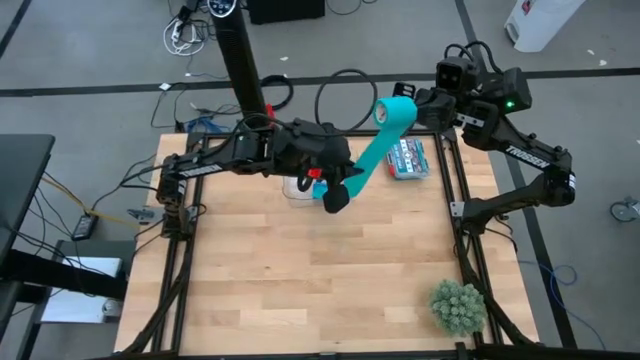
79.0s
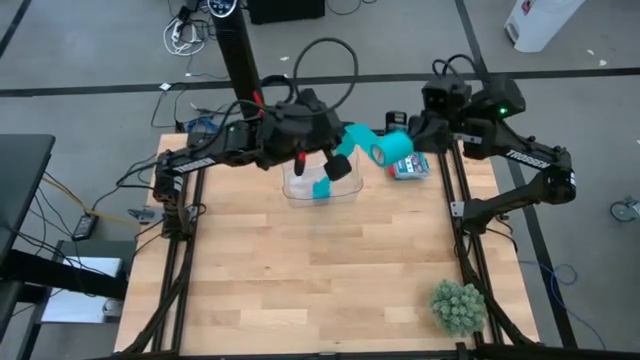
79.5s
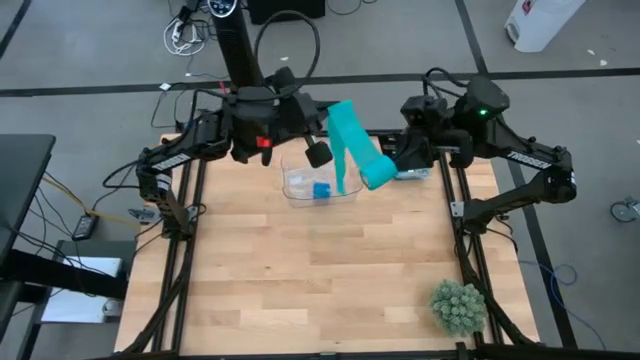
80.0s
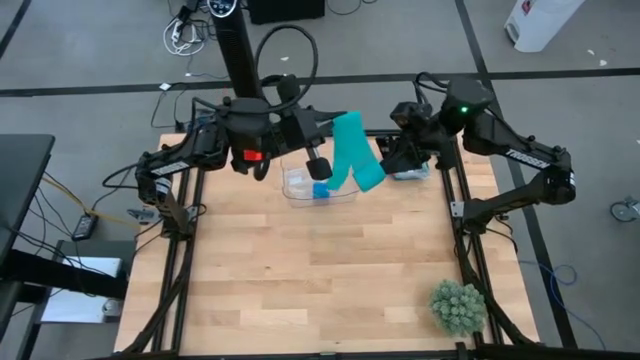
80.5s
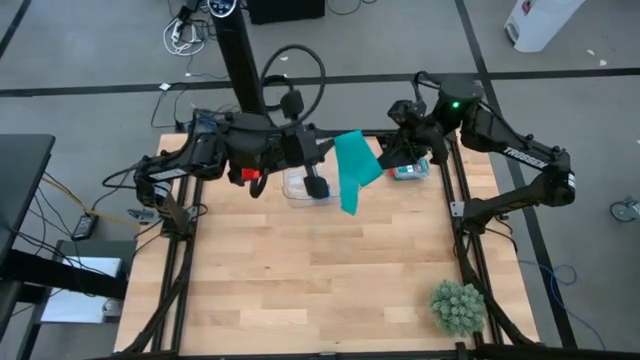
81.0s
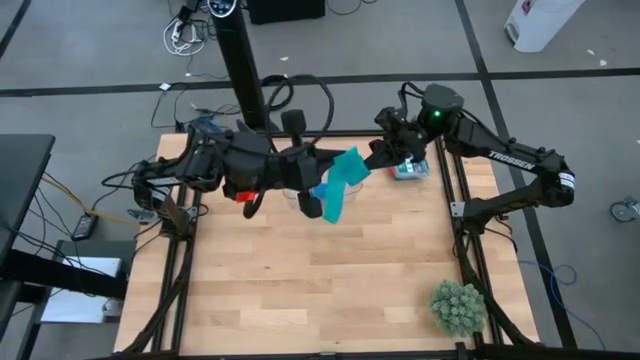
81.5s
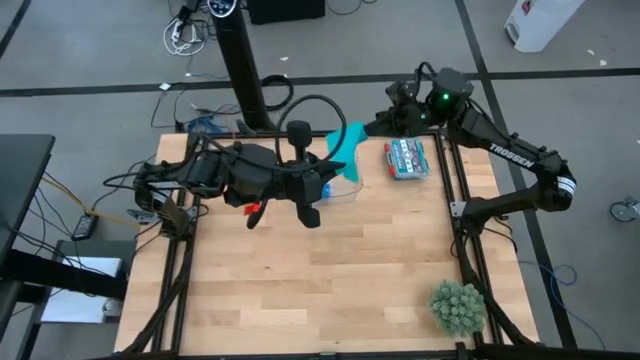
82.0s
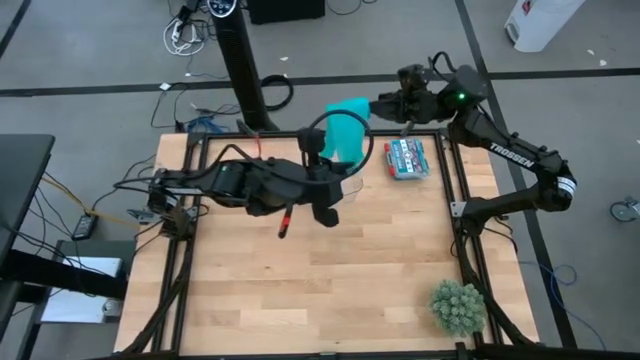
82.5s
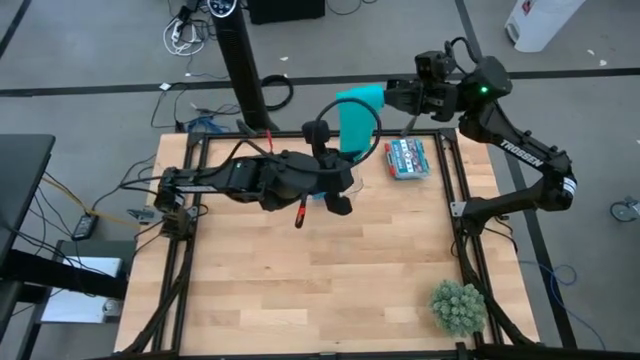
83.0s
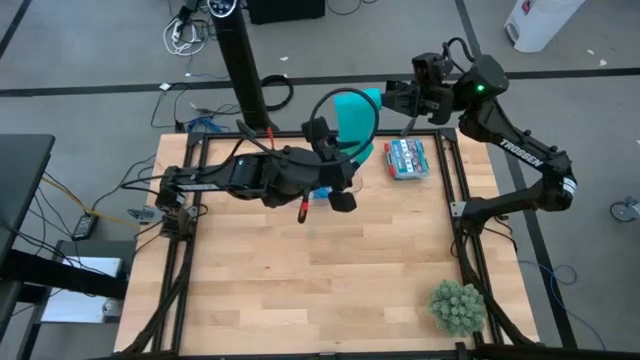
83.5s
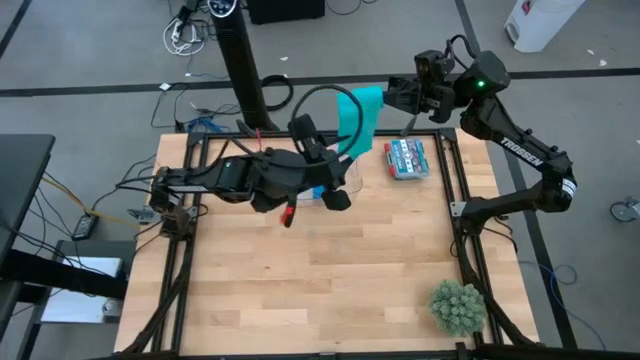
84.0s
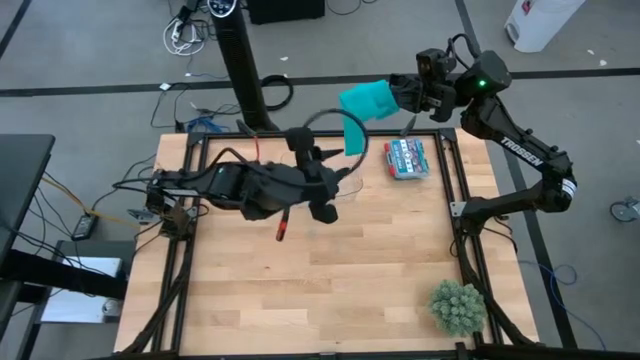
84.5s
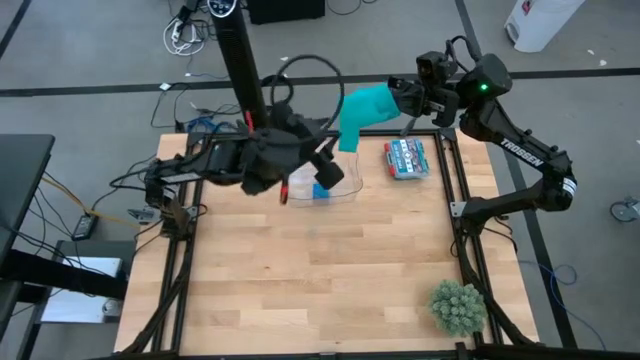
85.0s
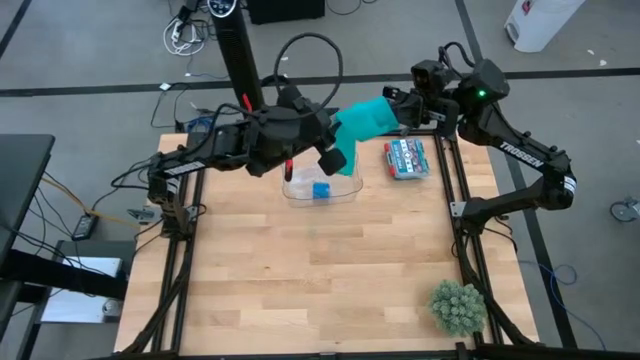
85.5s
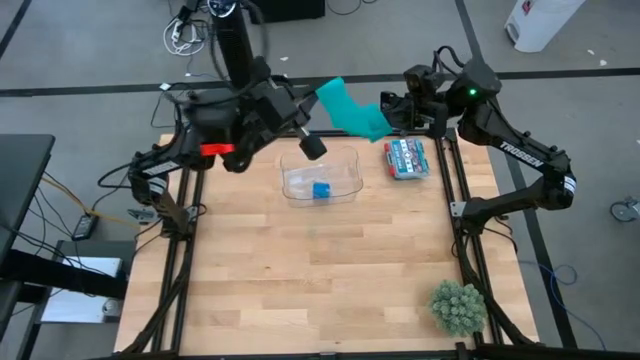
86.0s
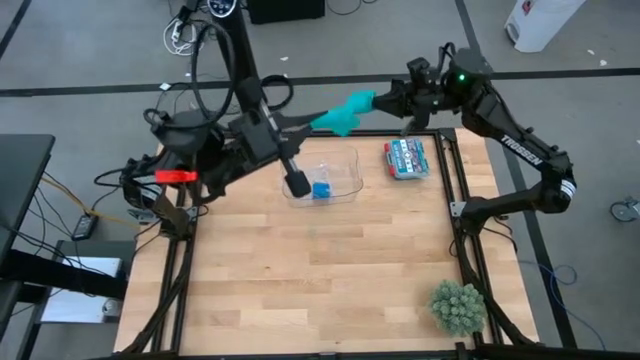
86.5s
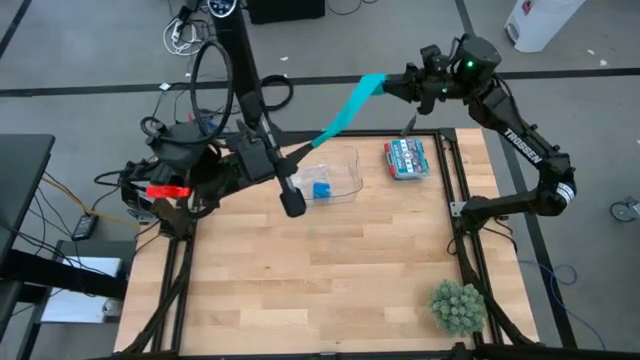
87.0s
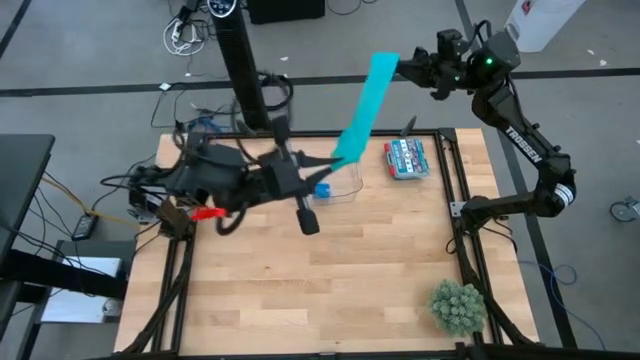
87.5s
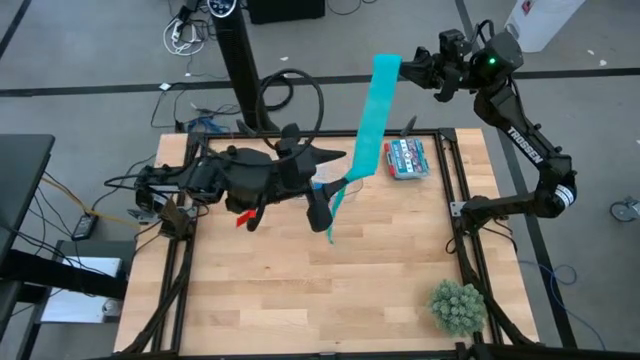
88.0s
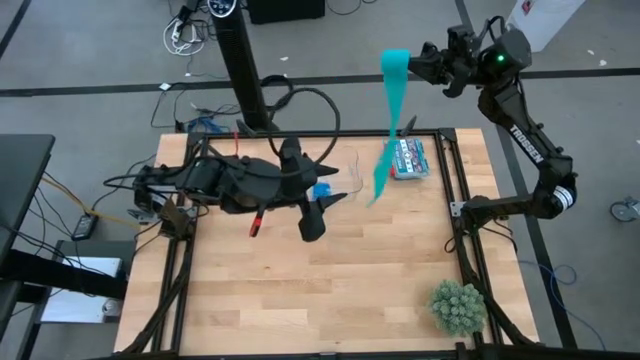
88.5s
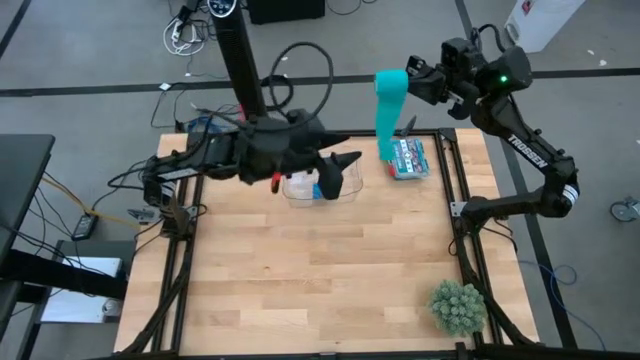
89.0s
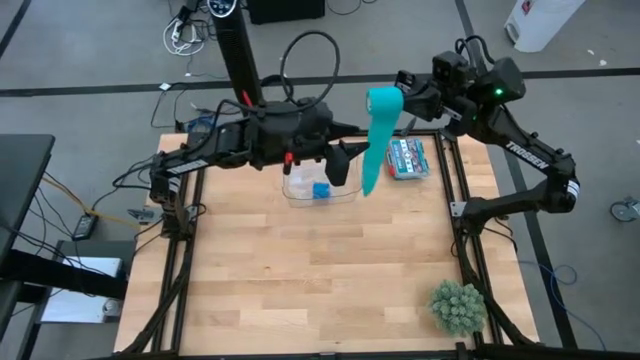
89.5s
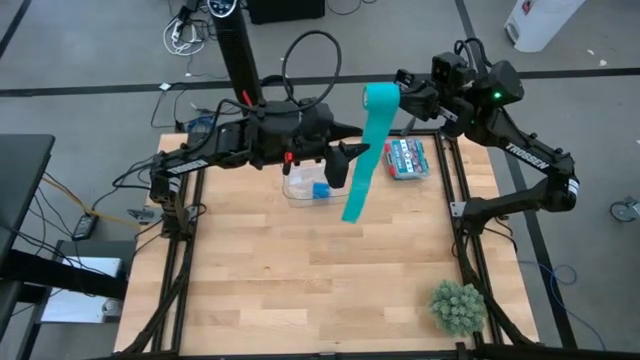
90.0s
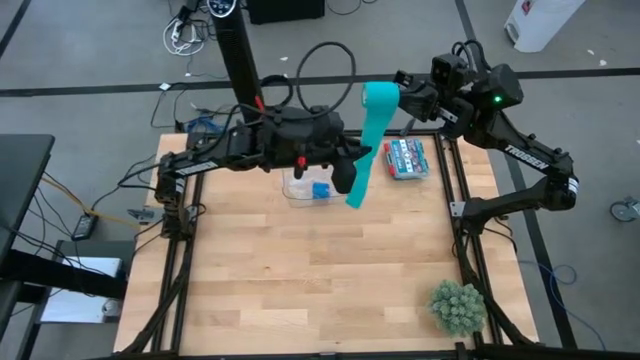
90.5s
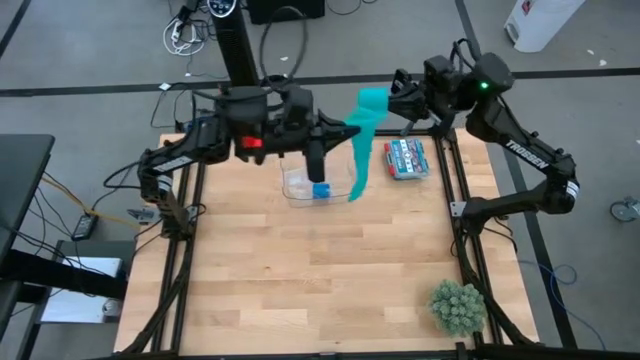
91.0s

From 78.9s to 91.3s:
Task: Roll bandage
Roll the sky blue bandage

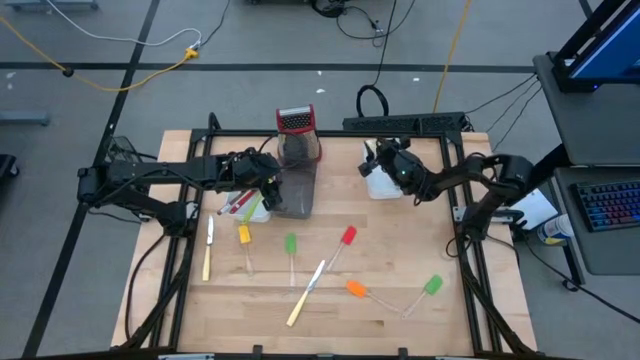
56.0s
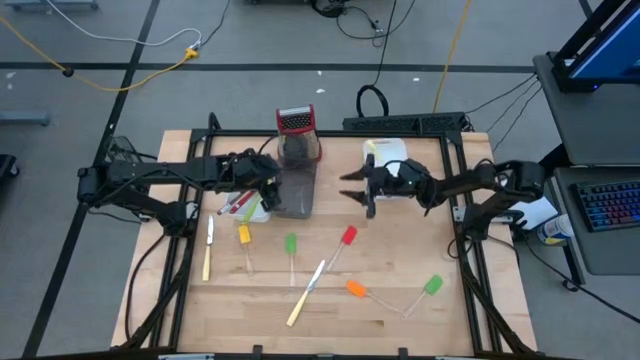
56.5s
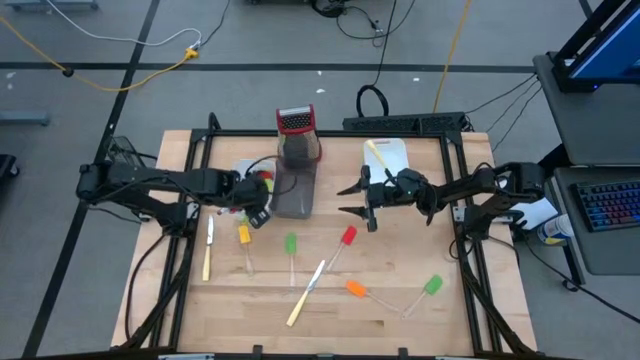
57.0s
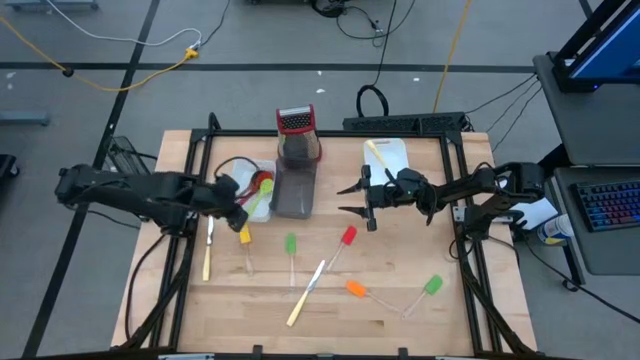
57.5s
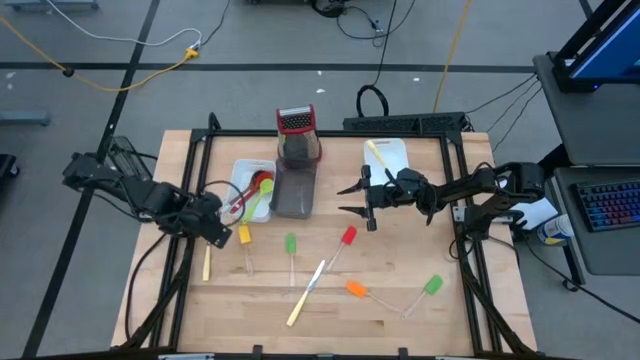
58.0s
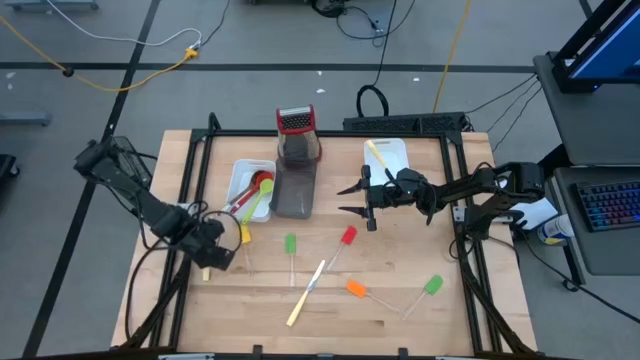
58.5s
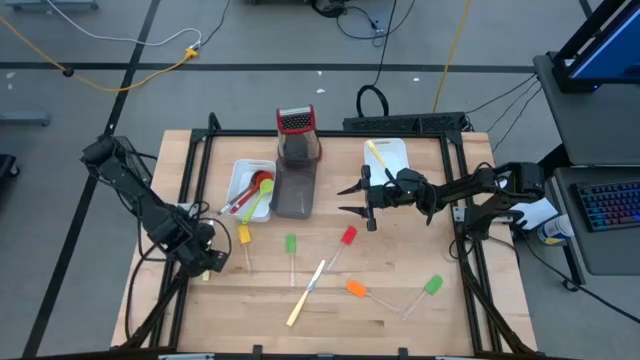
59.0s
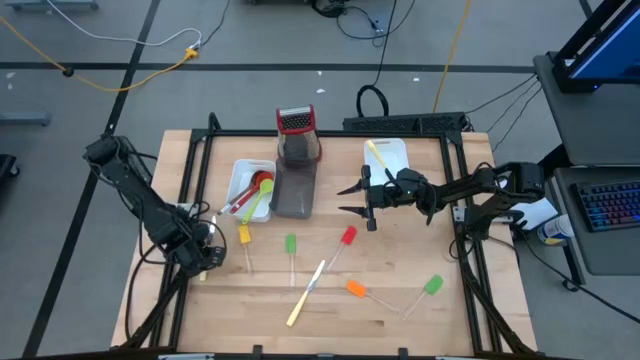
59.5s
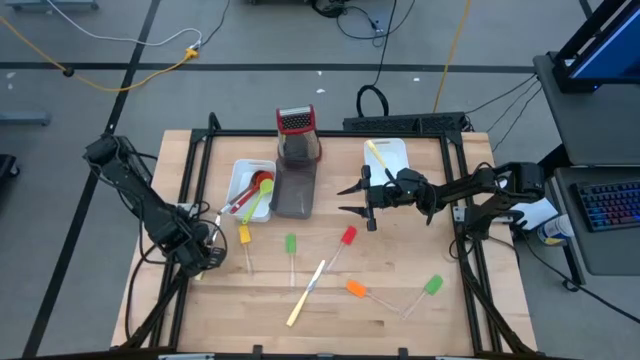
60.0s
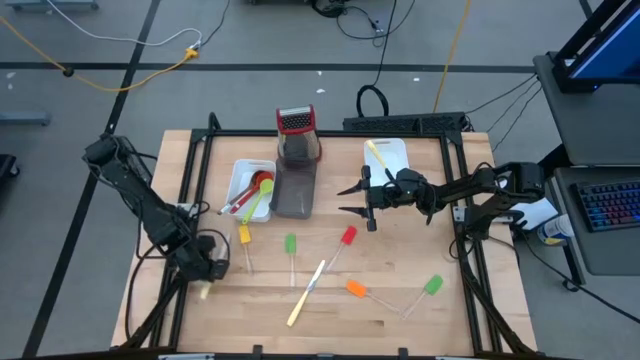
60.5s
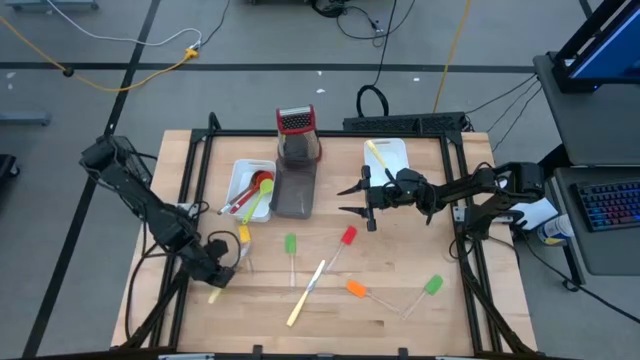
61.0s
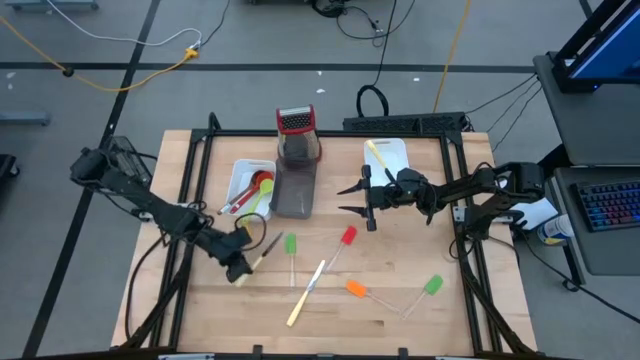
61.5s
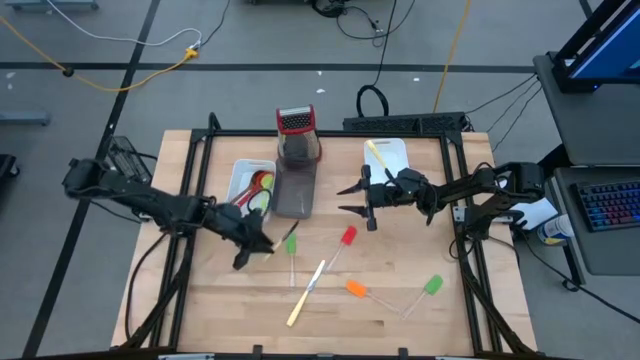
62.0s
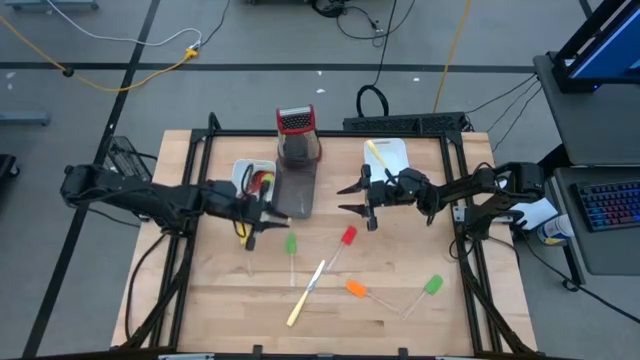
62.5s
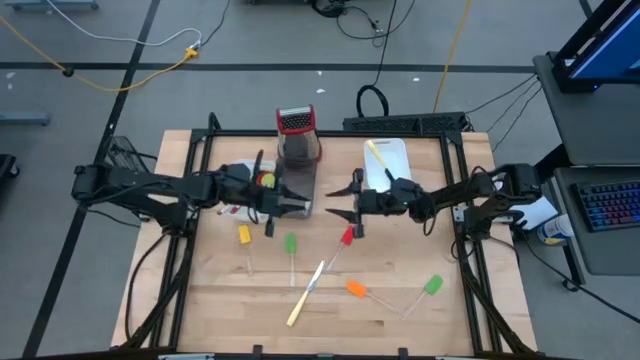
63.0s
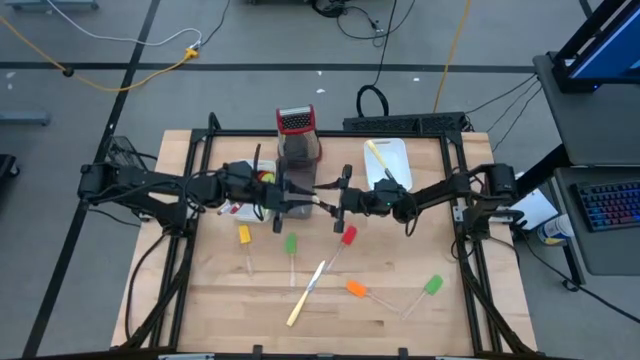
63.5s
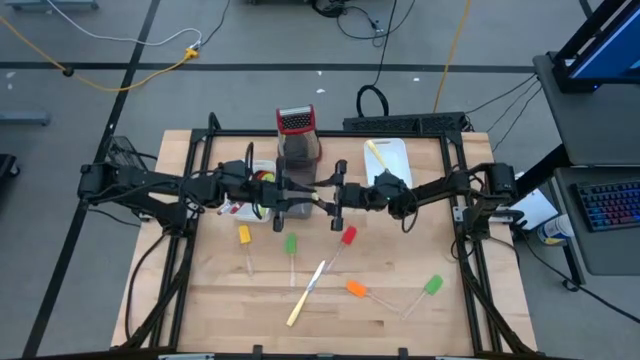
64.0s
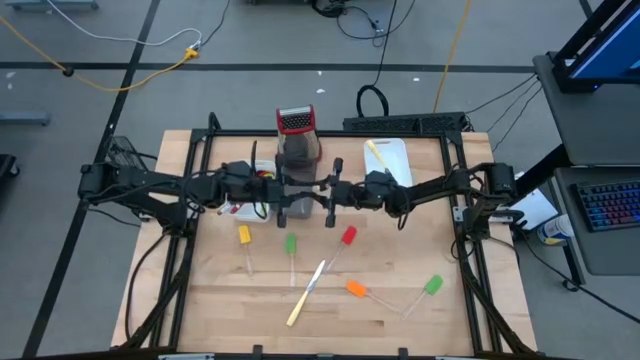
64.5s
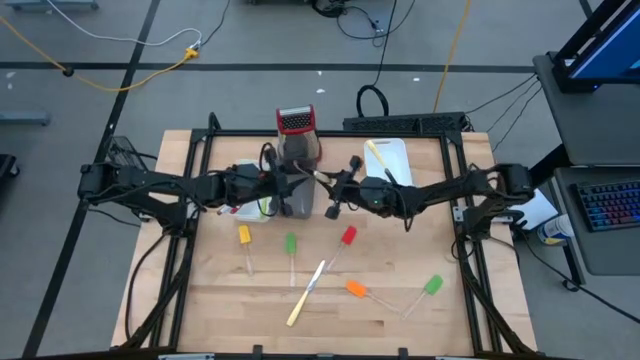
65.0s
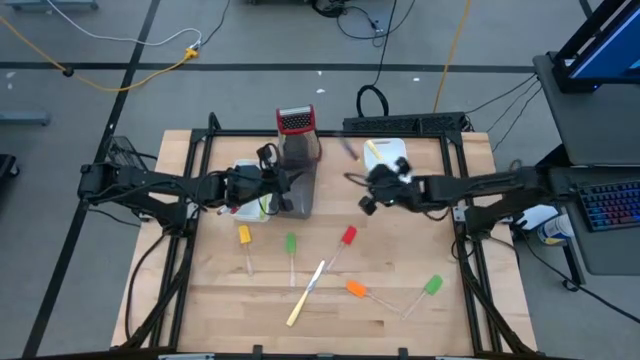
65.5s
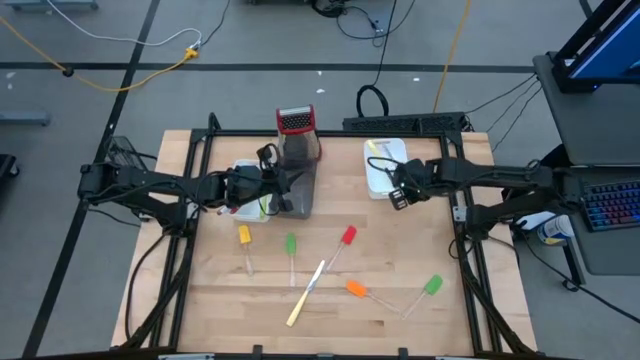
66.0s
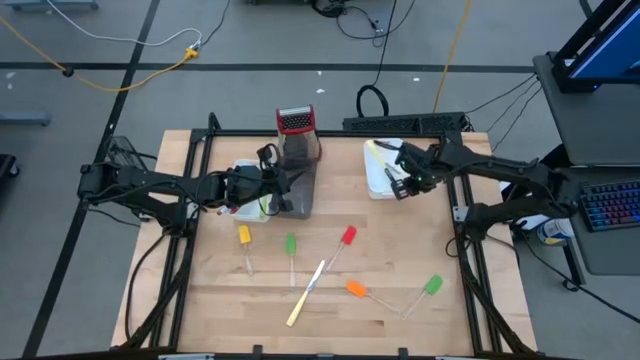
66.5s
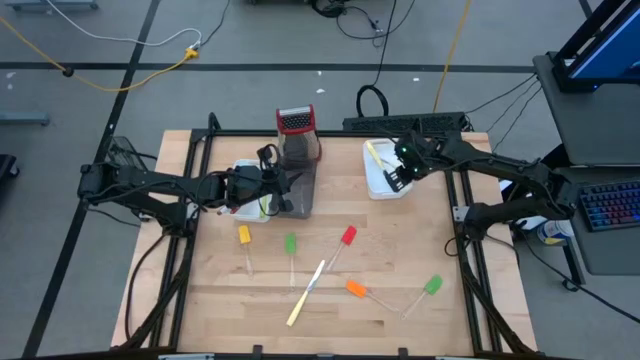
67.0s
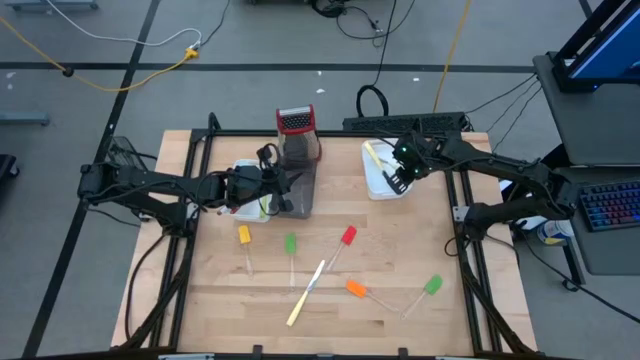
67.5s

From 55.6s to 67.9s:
Task: Pick & Place Kitchen Items
Put the left yellow knife into the right white bin
